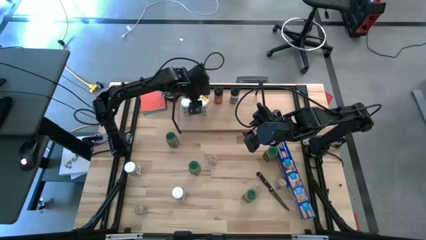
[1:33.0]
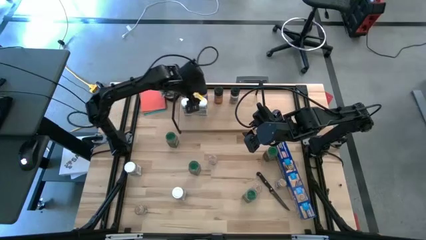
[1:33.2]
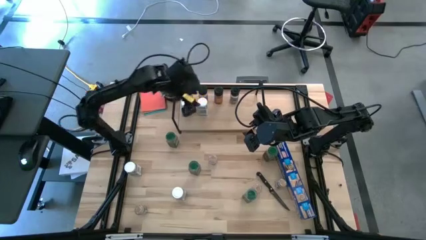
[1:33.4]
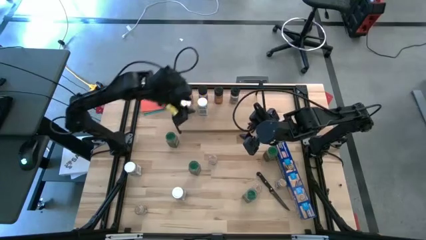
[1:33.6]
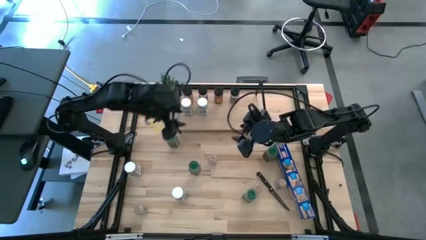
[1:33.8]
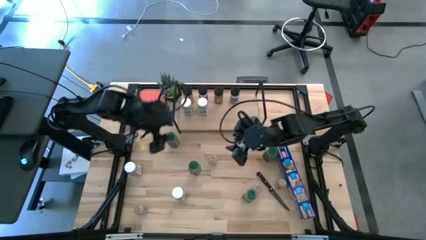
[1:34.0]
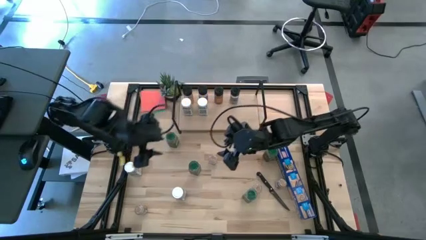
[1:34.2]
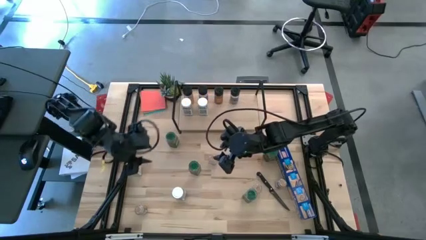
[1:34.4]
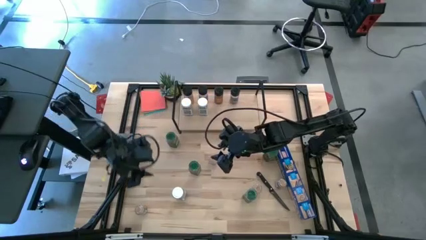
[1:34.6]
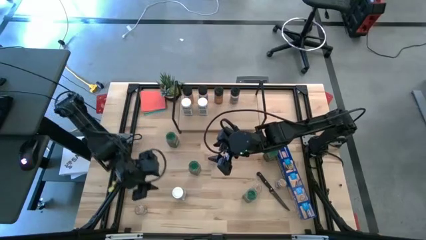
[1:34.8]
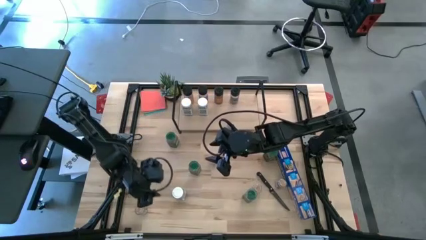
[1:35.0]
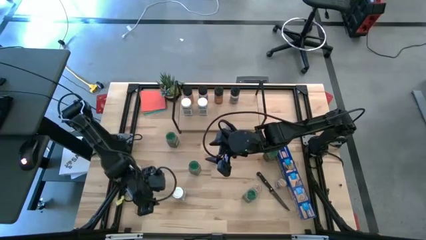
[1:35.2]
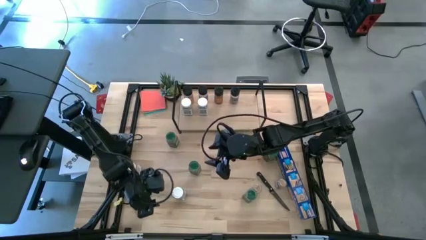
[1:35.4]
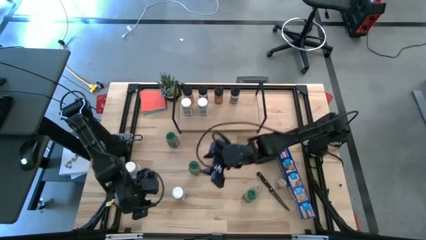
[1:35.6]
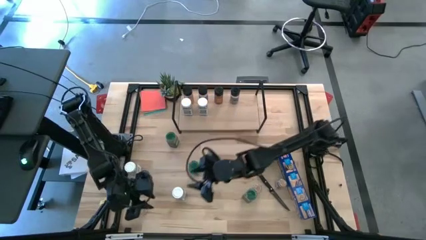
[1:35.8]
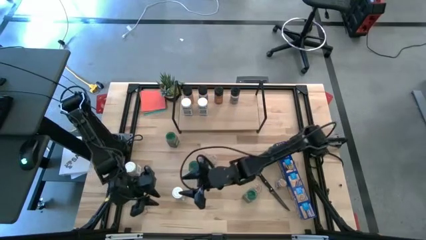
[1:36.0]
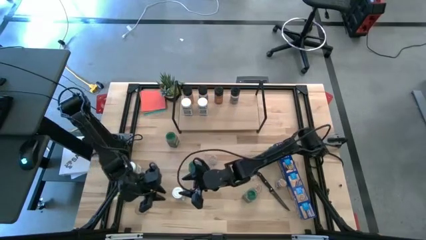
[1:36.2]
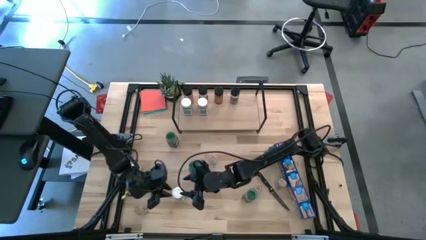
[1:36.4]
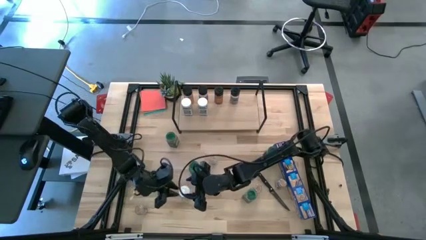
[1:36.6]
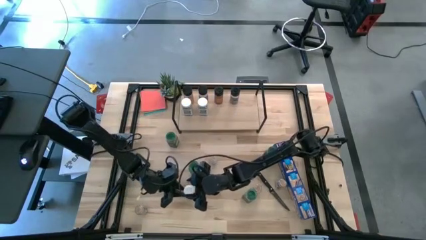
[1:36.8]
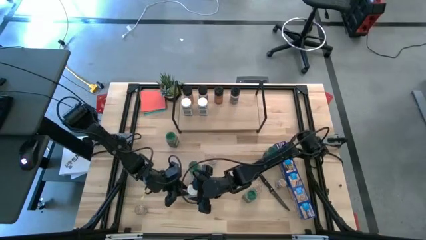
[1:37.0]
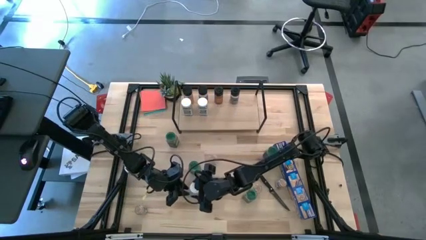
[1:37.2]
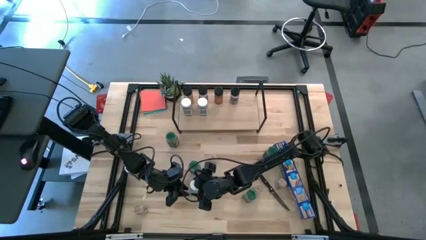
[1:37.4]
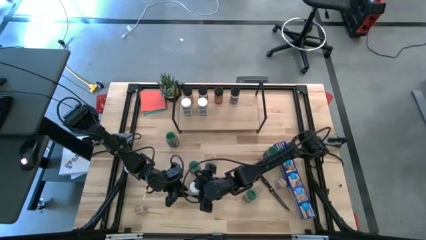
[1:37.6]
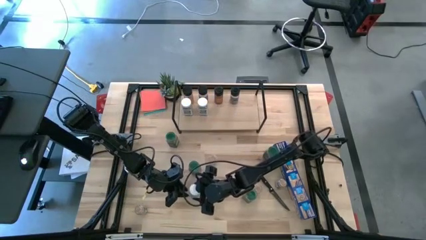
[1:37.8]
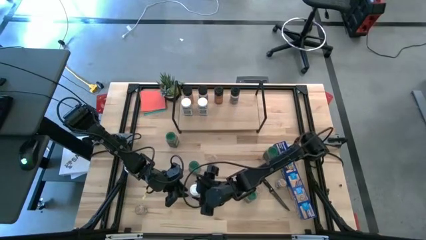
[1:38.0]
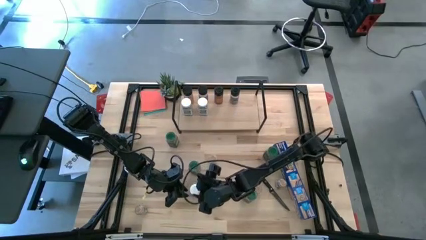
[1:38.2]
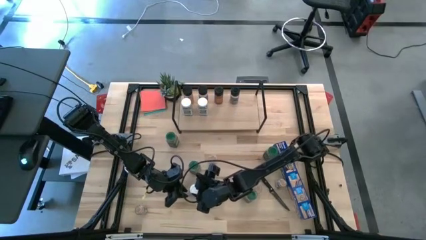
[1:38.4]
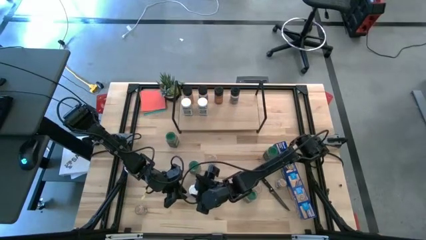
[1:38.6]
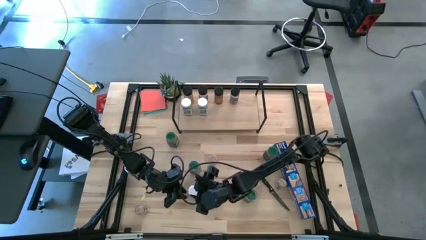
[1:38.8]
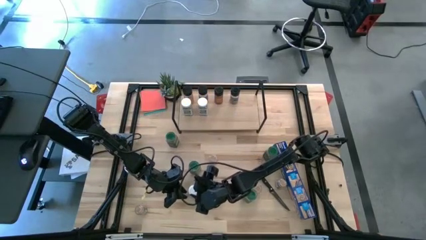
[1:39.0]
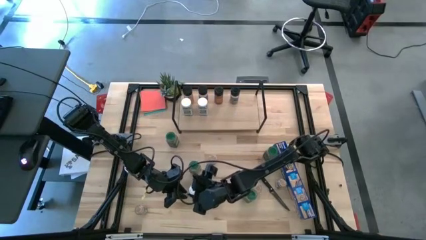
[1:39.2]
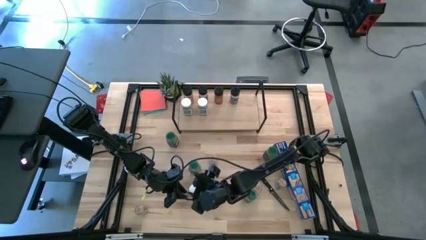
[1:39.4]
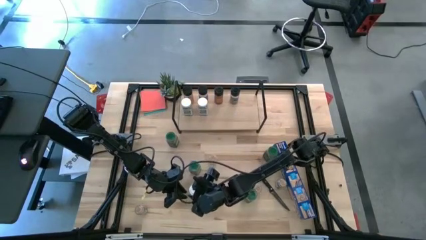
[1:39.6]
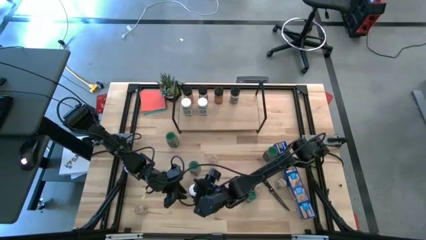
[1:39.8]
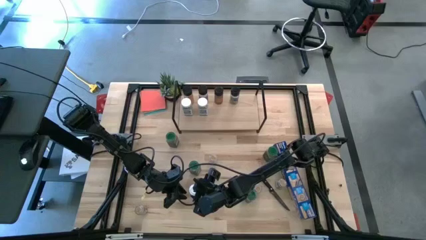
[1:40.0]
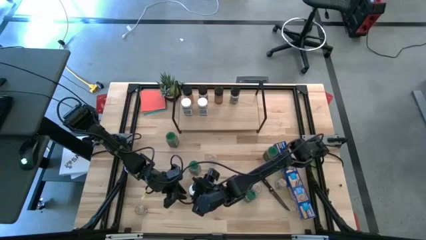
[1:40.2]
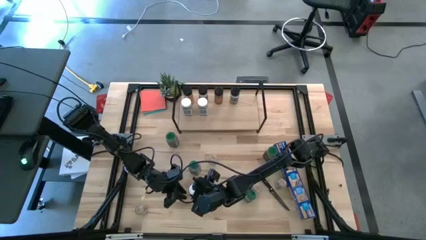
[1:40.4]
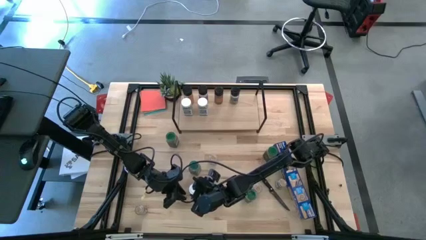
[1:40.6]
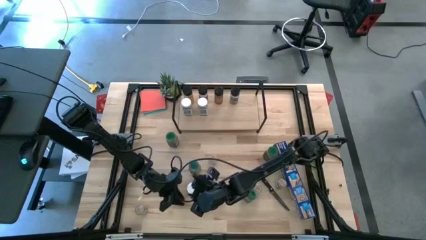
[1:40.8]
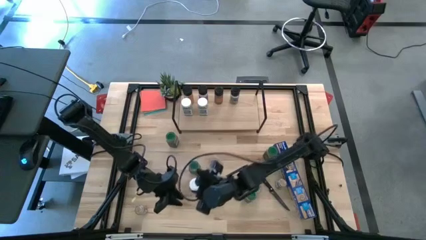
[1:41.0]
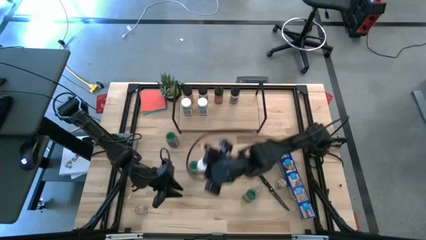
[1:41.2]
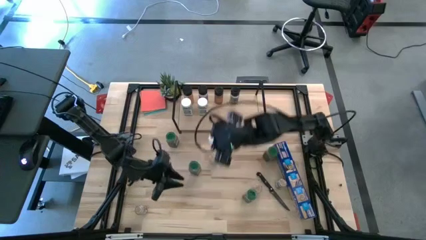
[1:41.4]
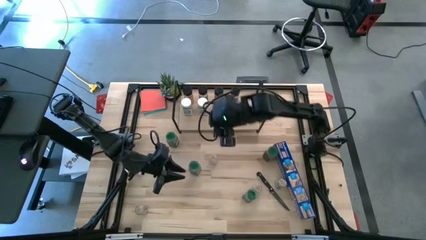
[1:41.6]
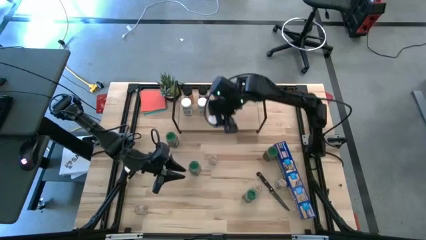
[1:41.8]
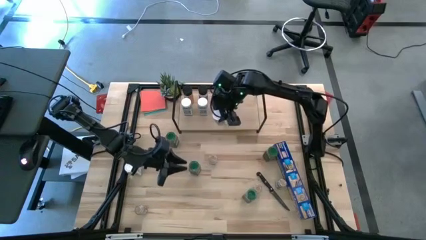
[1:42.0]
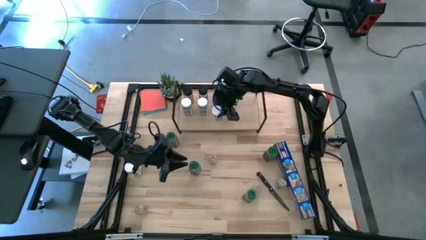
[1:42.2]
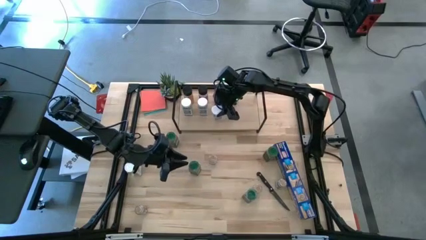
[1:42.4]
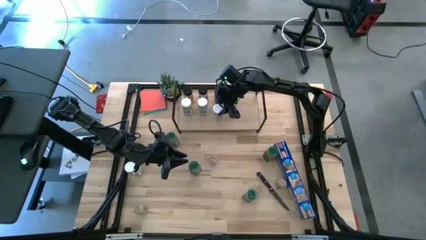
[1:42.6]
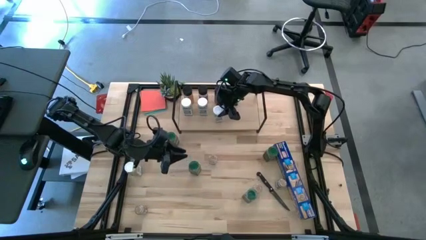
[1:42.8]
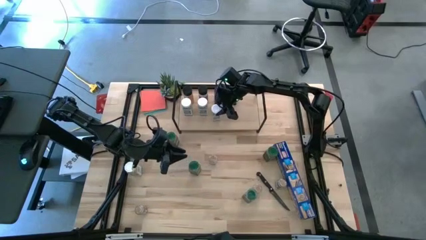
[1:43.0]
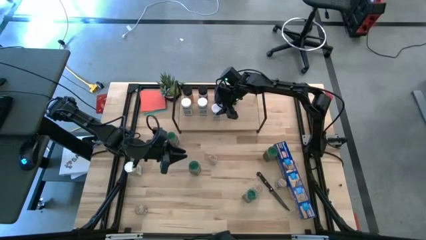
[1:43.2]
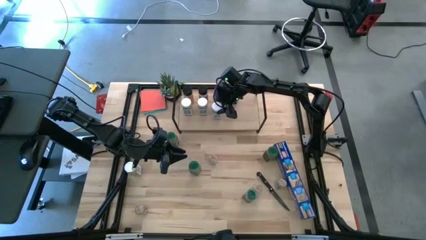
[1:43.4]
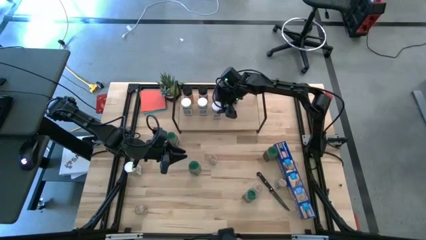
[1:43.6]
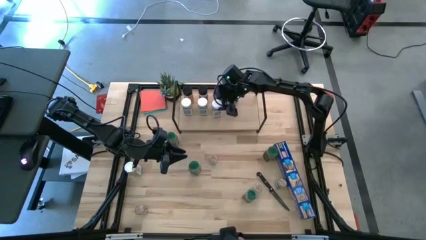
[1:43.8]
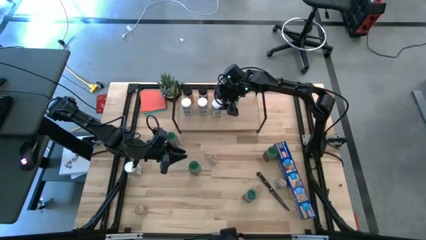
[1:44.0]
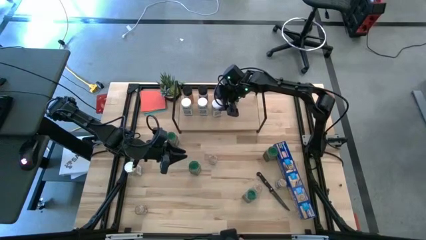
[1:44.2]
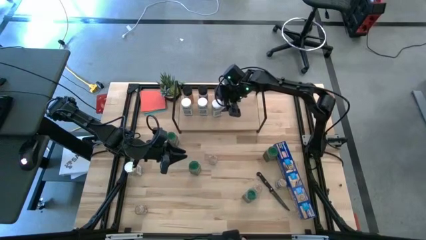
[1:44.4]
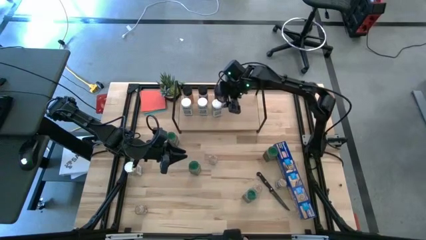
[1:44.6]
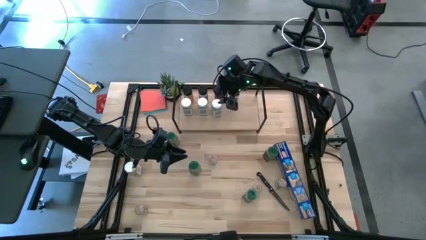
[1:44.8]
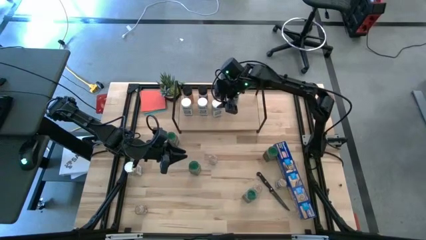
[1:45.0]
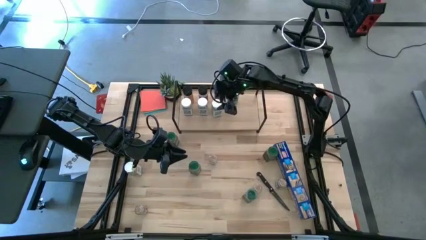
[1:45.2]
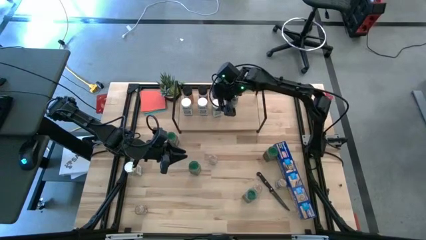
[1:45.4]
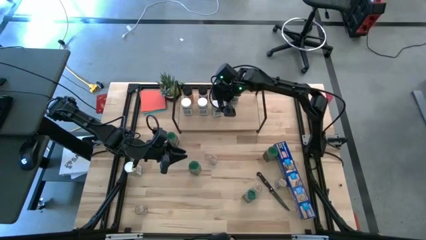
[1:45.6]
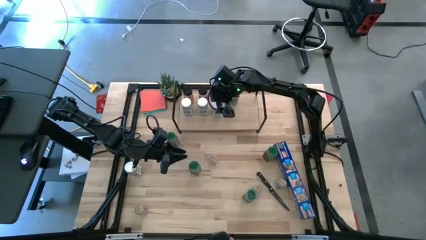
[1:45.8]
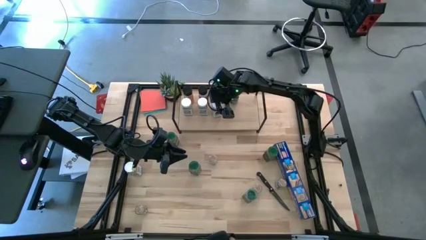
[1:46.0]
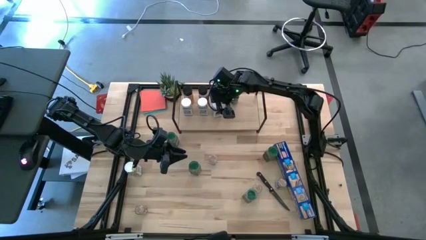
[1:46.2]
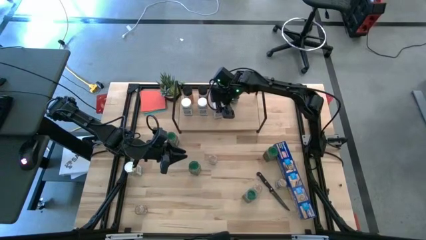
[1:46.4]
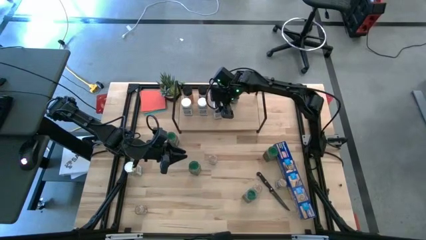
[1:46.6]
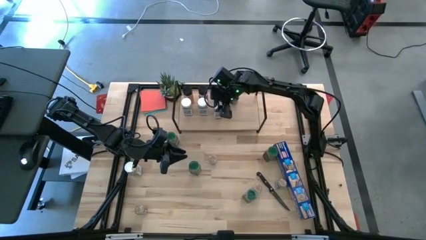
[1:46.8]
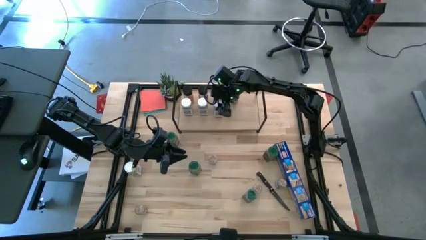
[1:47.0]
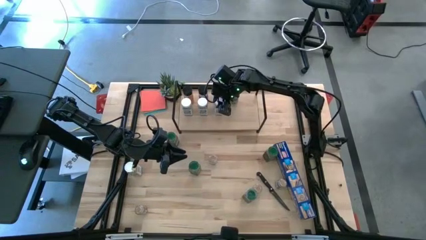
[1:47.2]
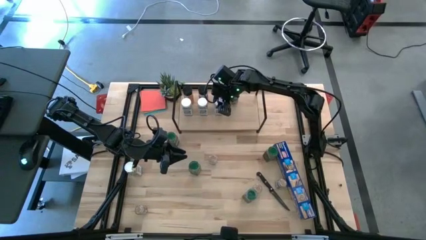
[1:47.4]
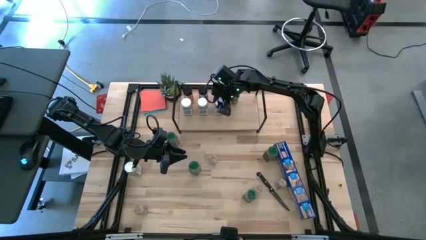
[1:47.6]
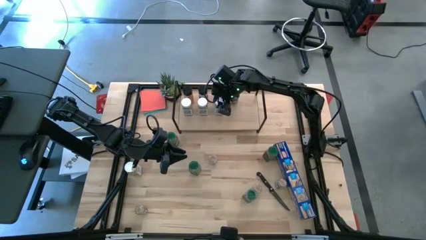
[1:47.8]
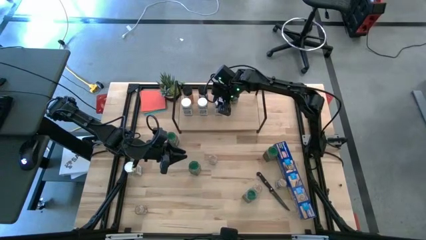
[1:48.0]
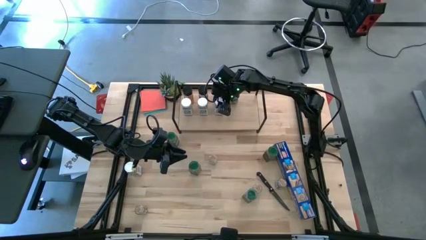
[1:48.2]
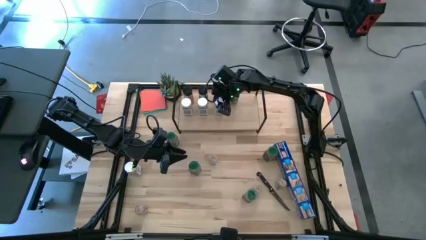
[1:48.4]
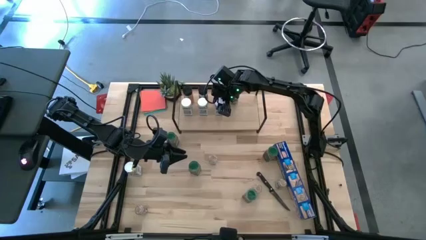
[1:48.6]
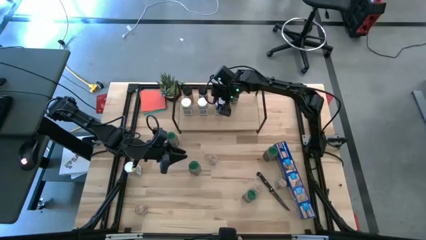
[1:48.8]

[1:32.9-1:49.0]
Task: Shelf spices
Put the white seasoning bottle on the shelf aligned with the black seasoning bottle
